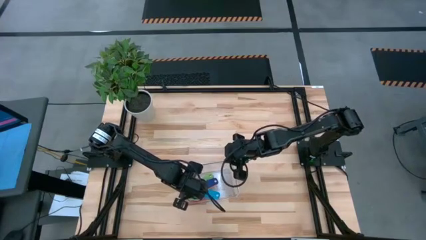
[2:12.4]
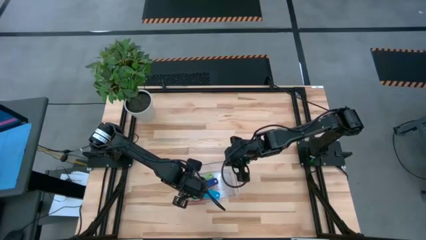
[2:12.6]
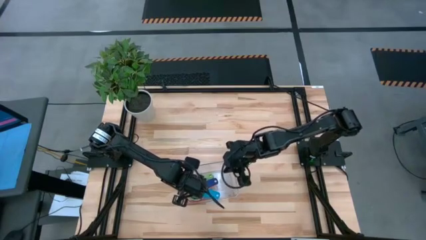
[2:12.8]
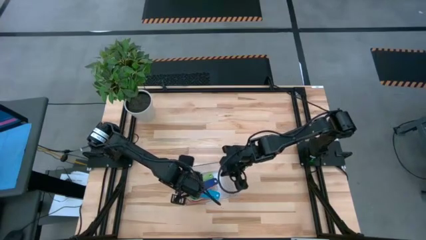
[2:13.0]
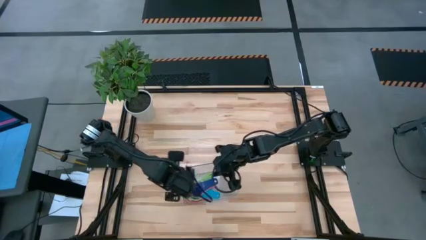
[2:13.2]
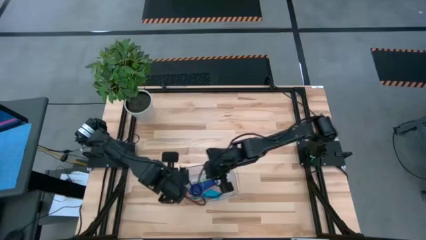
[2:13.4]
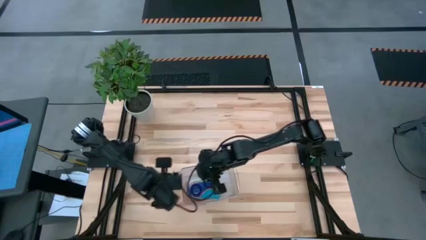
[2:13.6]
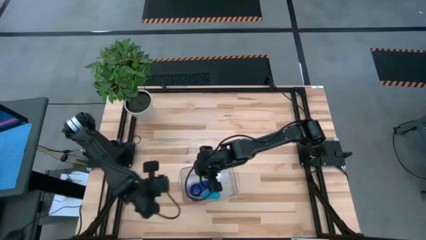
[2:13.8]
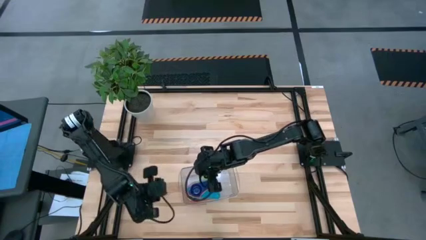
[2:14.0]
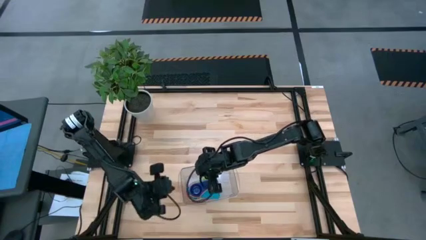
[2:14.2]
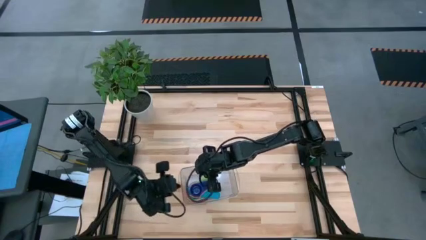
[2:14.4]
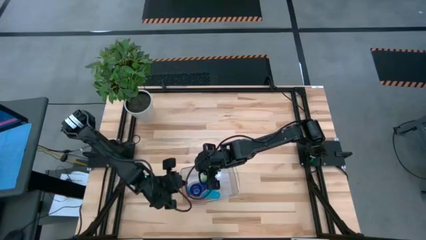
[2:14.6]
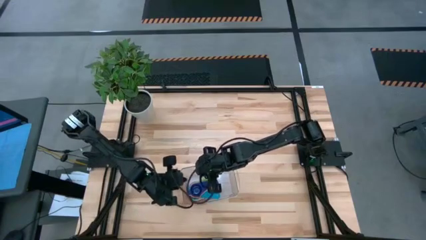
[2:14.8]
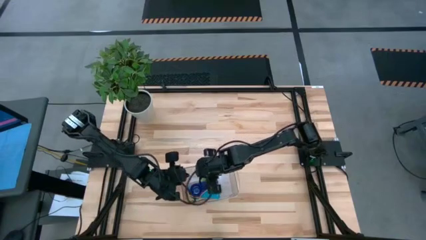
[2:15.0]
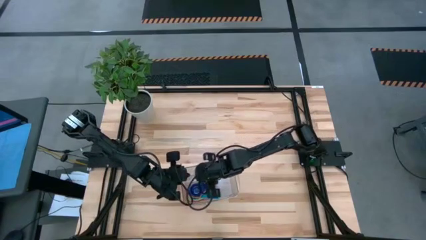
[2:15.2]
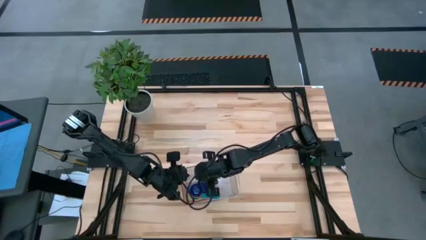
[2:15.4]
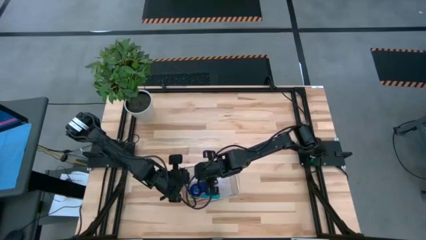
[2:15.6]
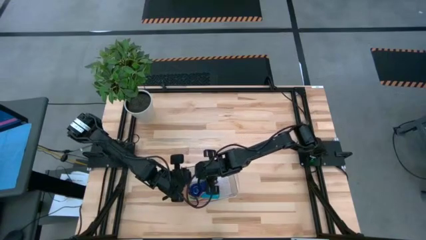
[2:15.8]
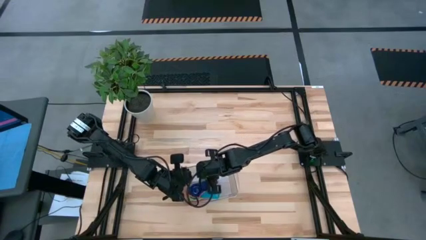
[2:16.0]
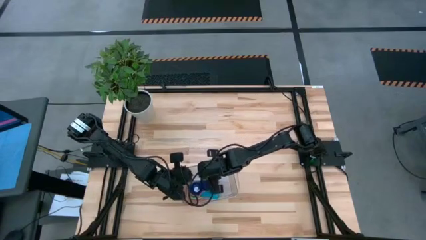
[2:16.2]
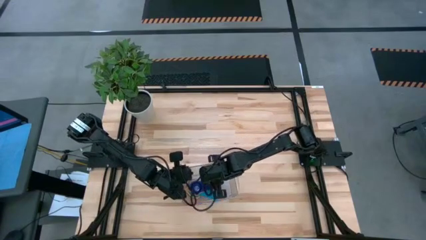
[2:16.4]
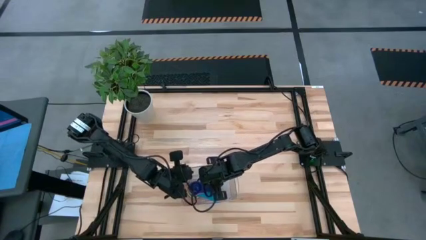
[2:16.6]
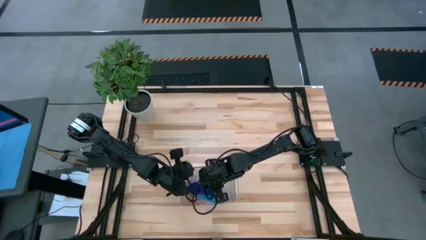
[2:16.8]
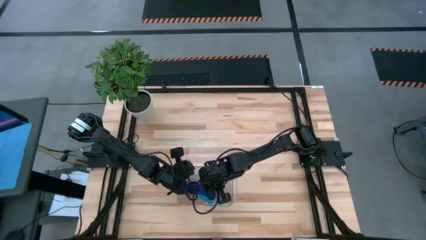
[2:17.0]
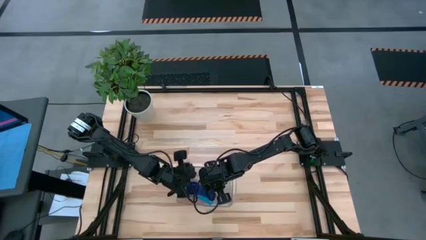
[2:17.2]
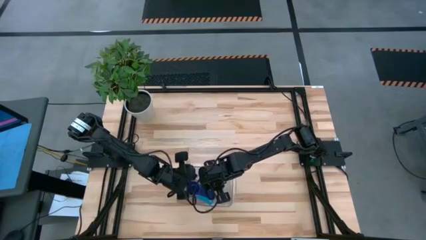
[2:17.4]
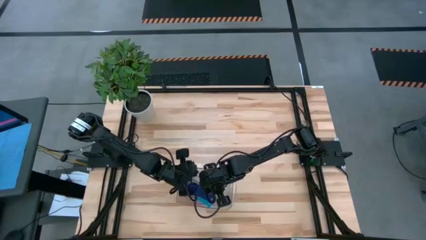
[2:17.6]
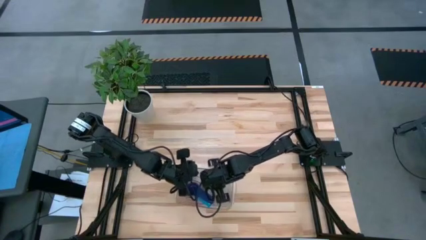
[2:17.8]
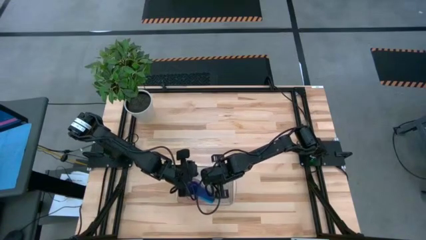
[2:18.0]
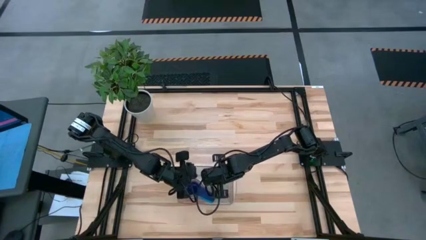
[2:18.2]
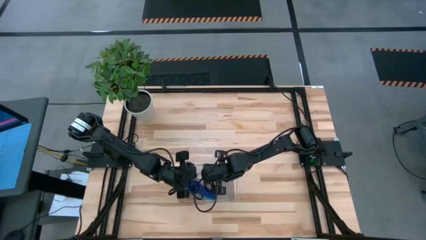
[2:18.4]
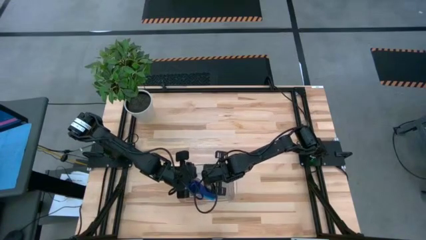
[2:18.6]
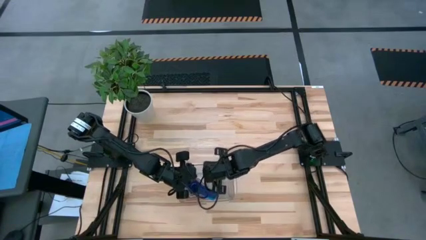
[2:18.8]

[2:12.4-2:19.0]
Task: Nest measuring cups in basket
Adjust the stacked measuring cups

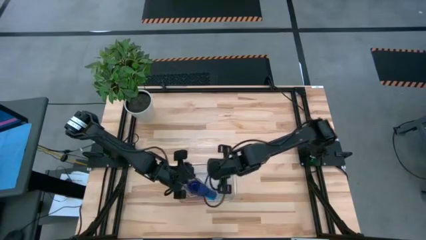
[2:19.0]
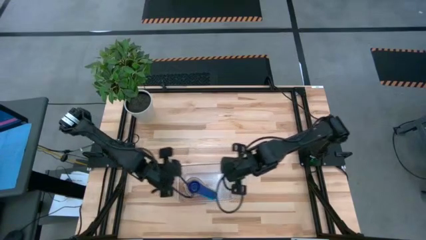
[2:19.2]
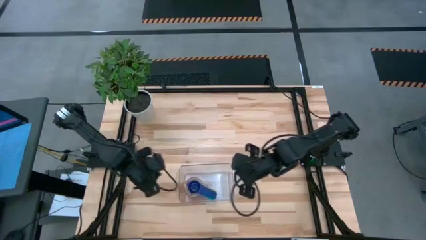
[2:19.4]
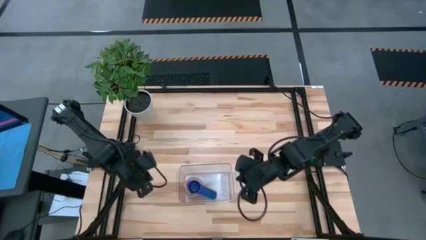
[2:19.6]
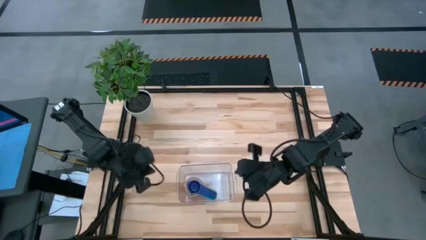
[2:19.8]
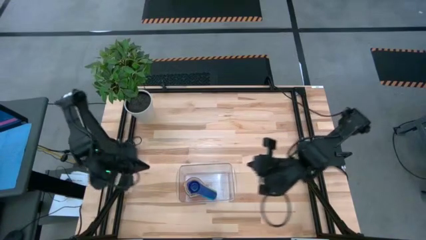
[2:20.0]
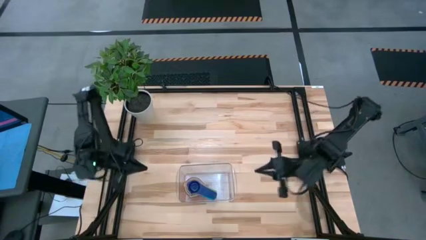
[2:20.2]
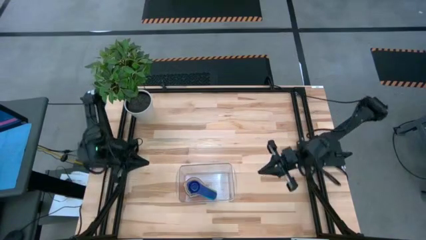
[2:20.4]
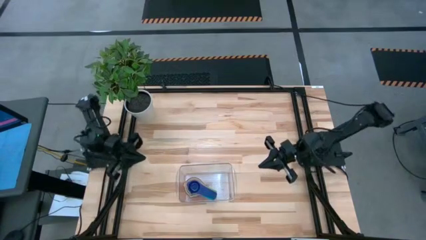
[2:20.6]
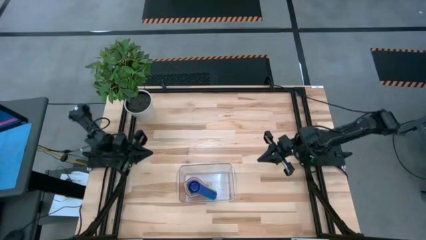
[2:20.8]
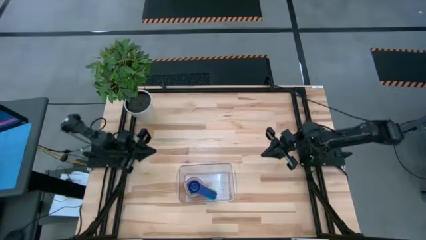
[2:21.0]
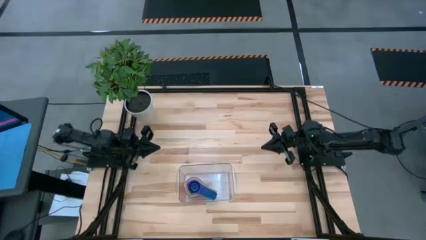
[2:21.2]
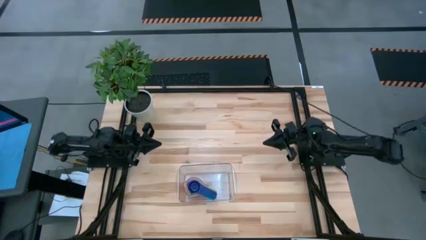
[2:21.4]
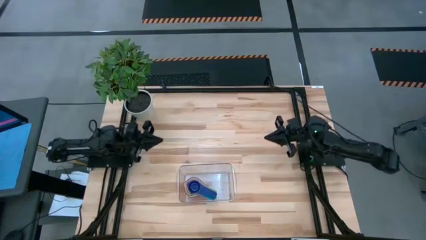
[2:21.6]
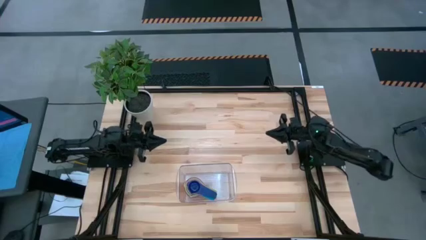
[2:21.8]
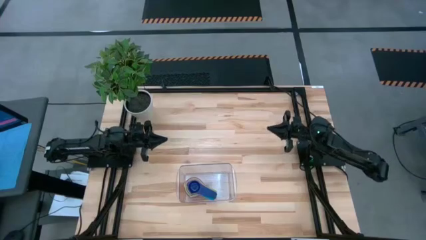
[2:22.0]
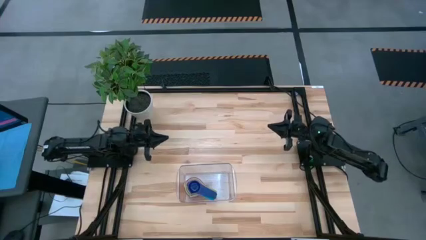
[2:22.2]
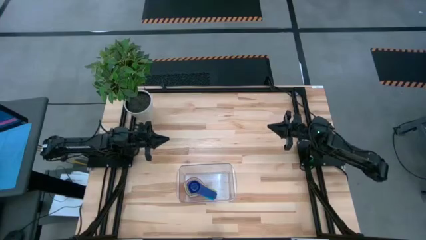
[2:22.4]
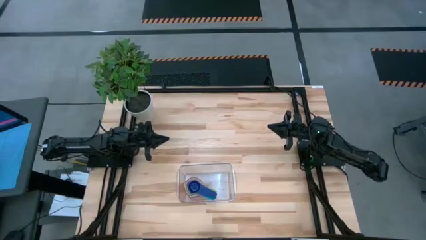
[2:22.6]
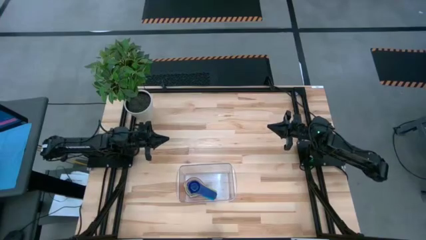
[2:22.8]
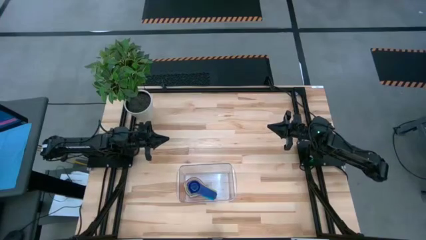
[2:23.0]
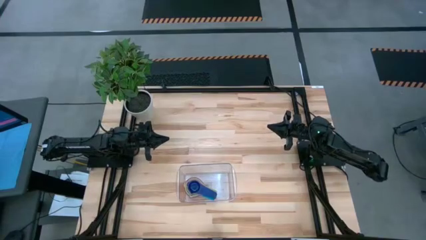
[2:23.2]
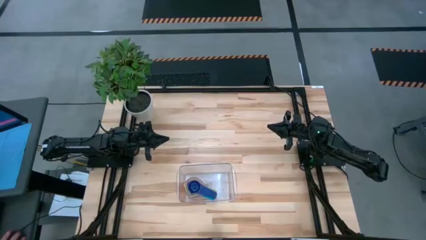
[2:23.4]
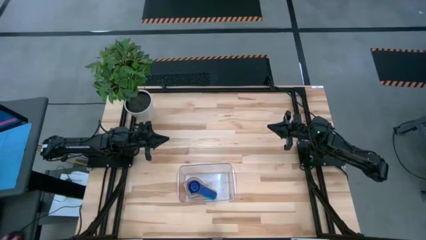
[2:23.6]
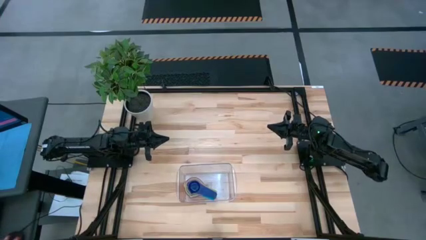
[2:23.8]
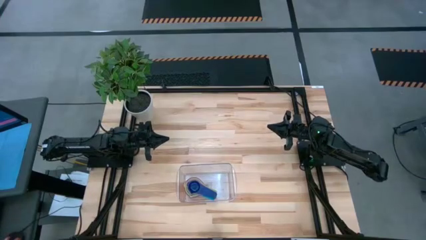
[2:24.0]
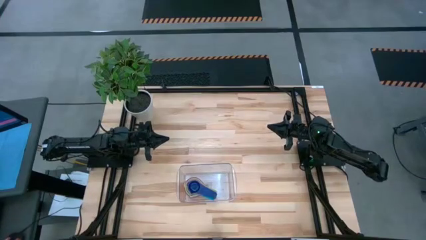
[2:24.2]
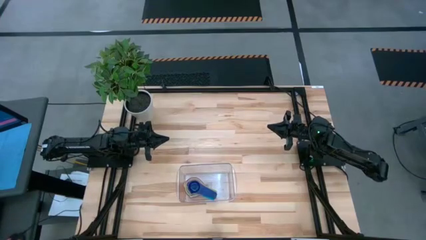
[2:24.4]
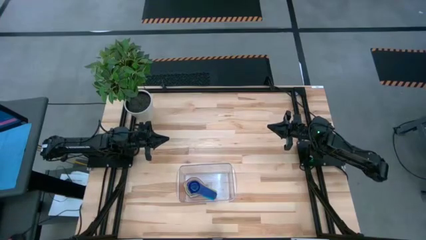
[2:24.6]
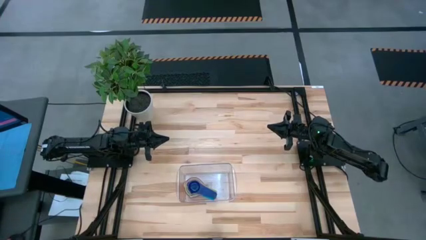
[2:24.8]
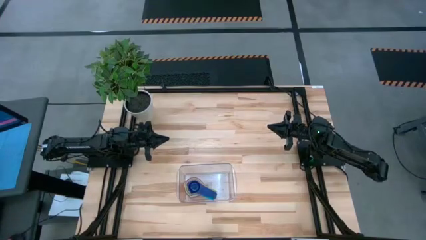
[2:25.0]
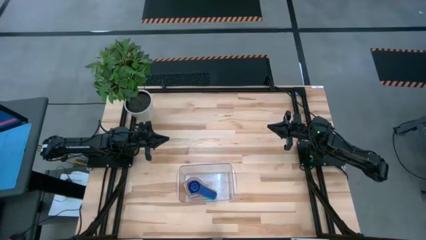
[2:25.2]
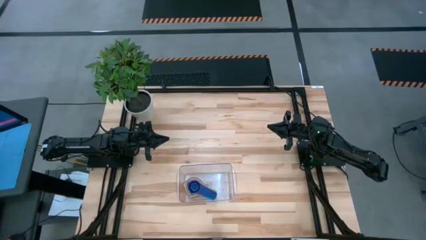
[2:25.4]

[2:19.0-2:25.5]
Return to Home Position

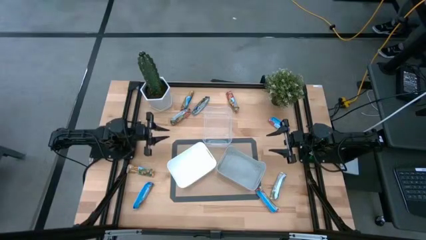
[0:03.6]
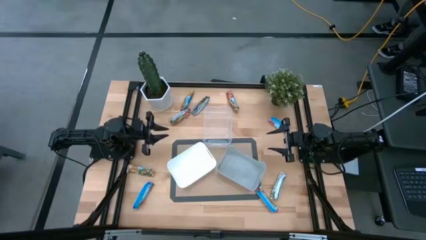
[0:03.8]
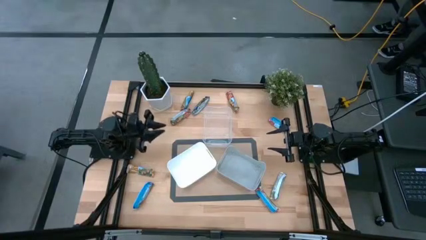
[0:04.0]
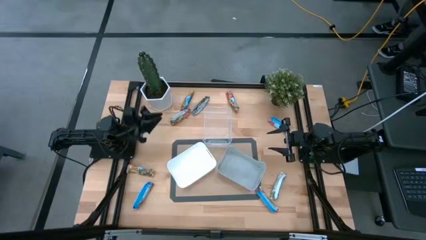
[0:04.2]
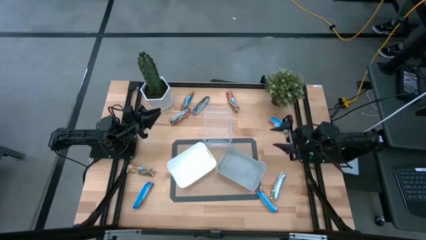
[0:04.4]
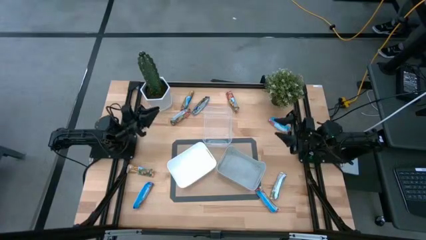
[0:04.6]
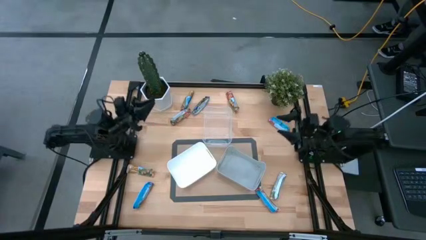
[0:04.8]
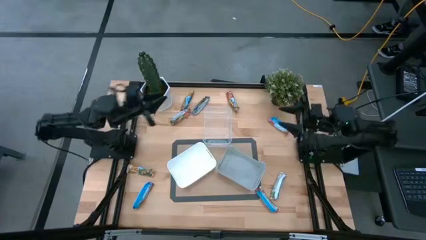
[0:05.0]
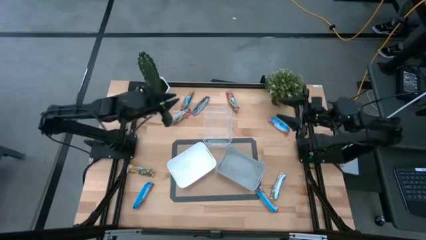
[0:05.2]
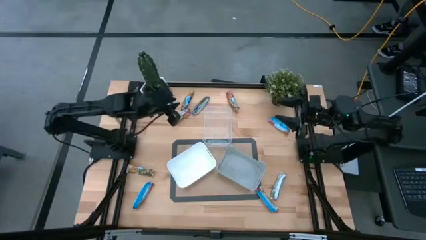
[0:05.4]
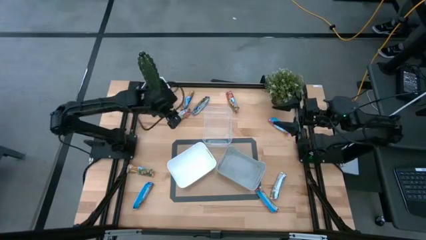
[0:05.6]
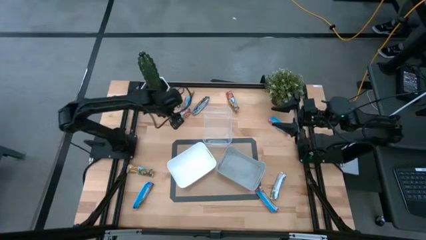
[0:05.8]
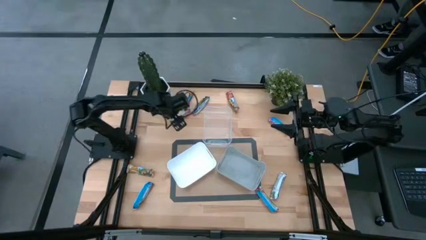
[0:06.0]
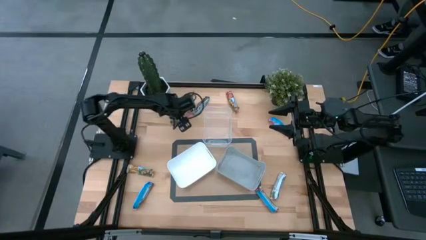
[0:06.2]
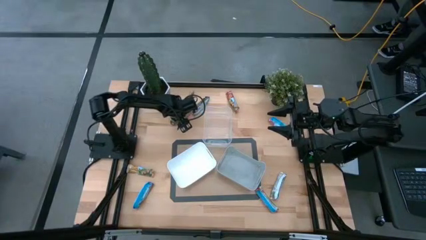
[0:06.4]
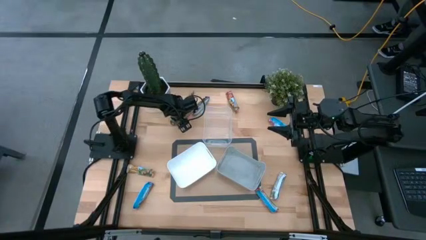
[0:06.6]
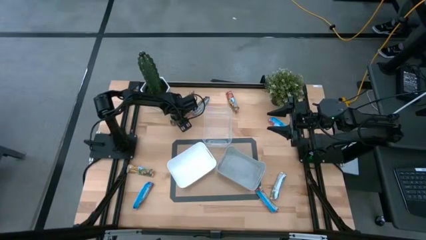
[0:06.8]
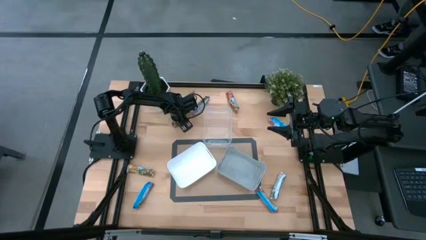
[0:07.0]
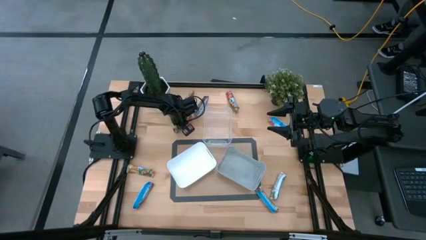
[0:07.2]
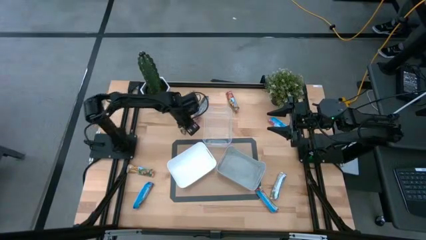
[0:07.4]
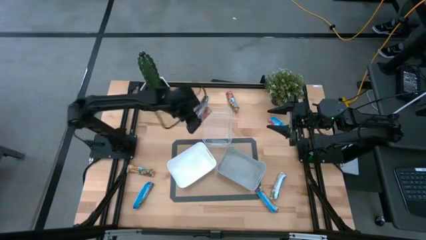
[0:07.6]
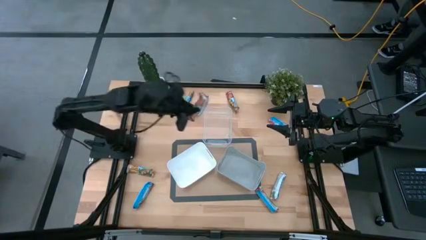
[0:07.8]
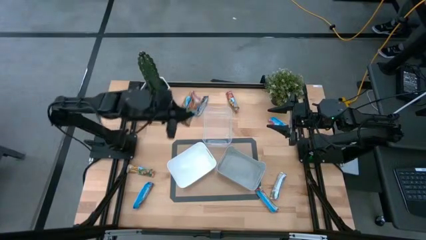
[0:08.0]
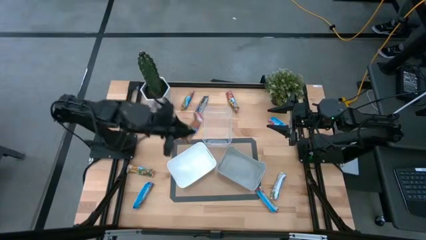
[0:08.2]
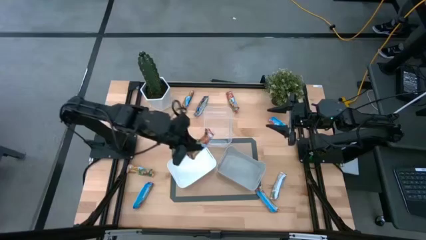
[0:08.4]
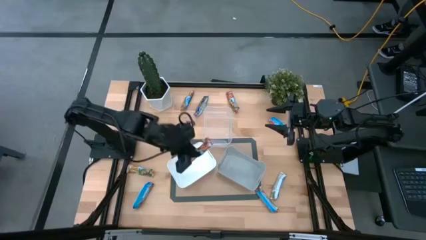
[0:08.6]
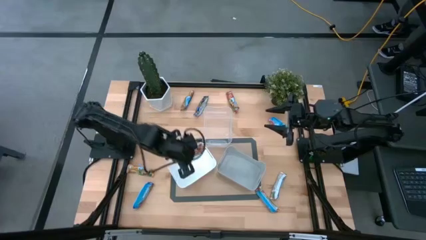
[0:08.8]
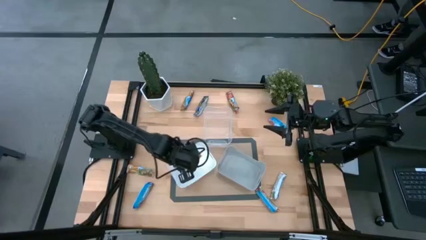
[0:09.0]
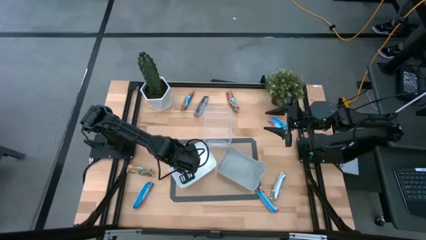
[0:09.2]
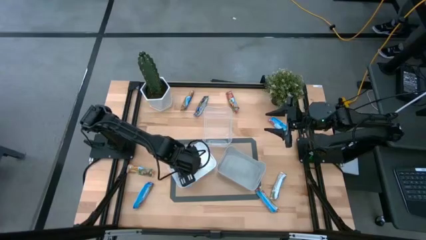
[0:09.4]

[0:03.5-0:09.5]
Task: Pick and place Granola Bars by type
Put the red granola bar into the white bin
